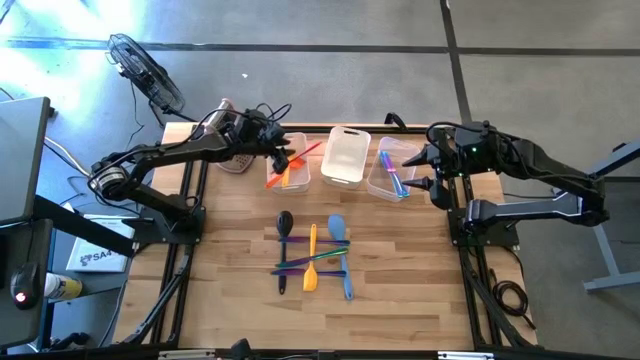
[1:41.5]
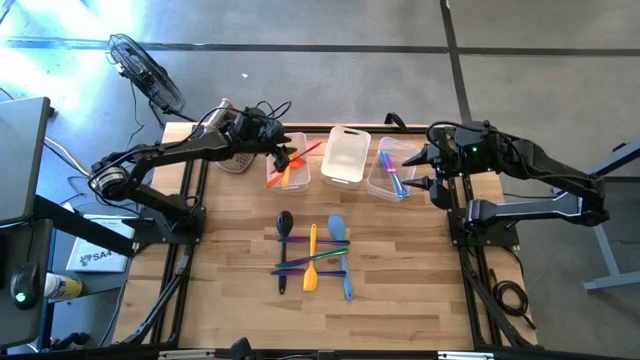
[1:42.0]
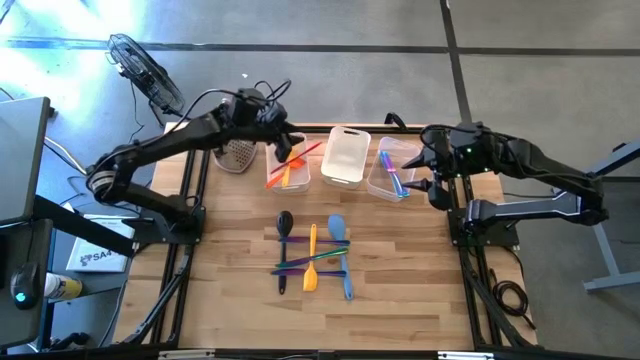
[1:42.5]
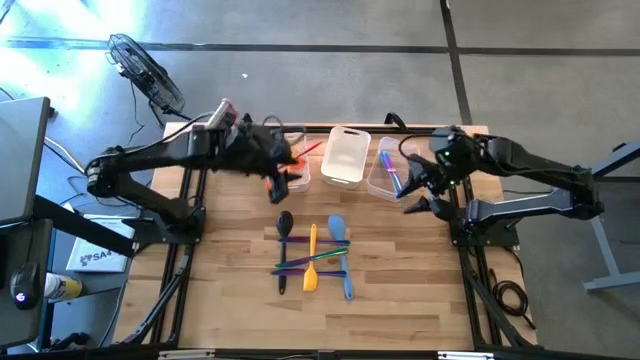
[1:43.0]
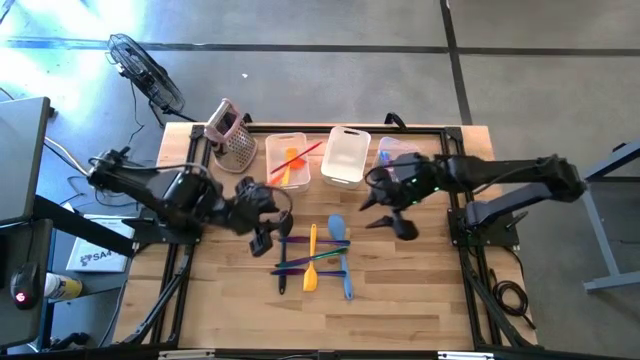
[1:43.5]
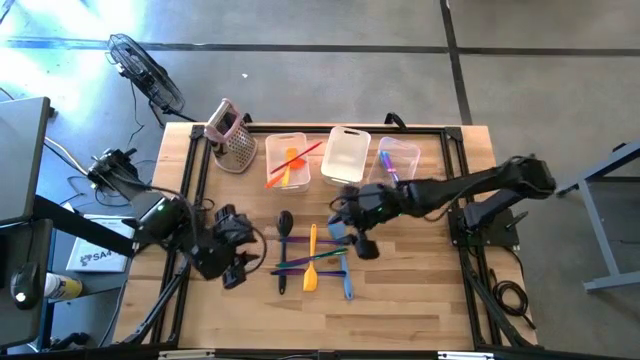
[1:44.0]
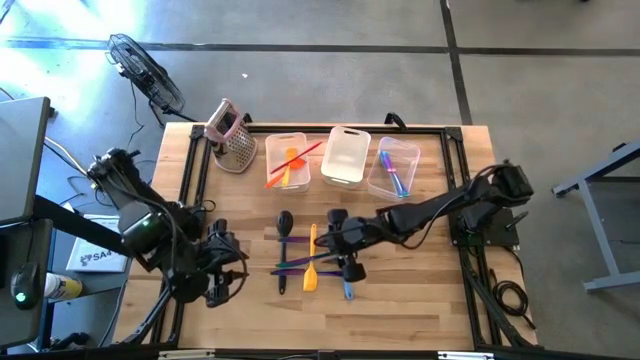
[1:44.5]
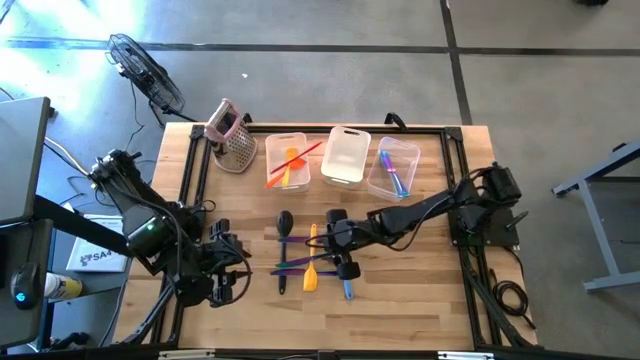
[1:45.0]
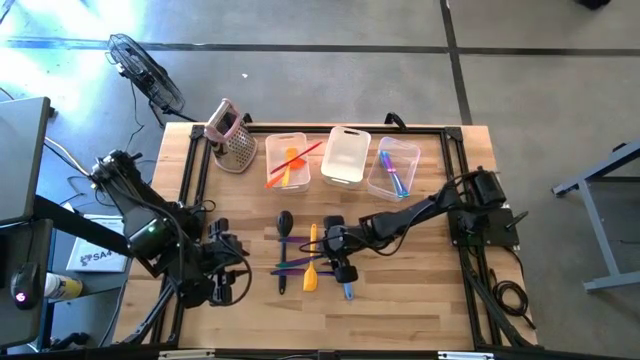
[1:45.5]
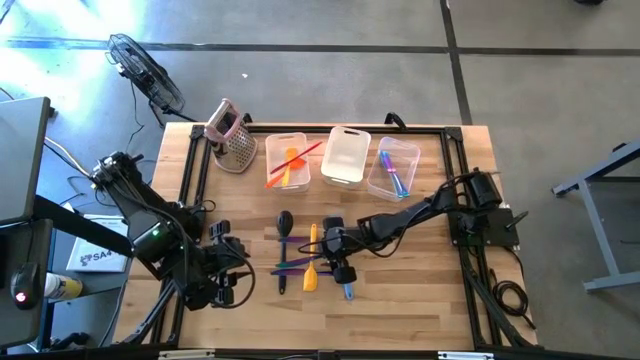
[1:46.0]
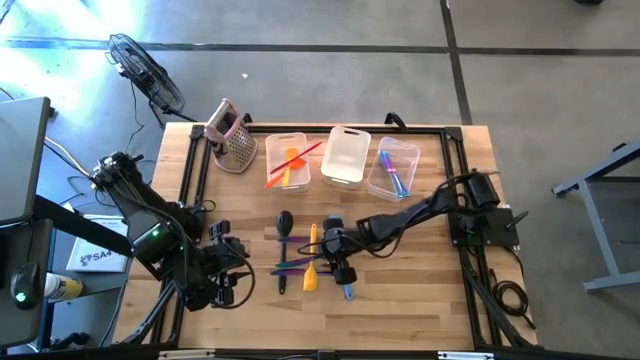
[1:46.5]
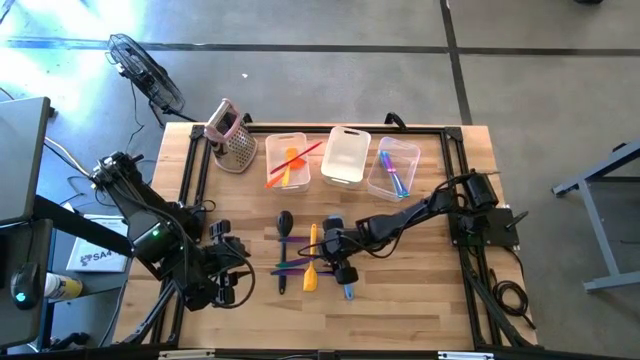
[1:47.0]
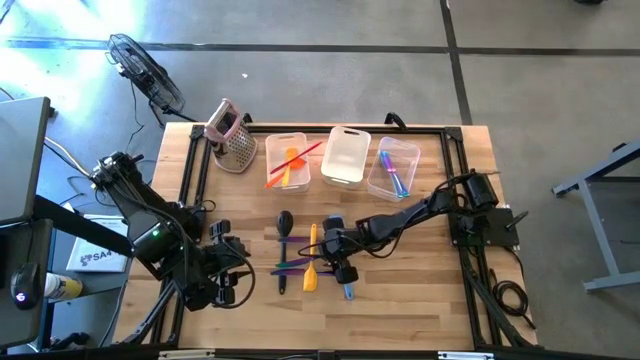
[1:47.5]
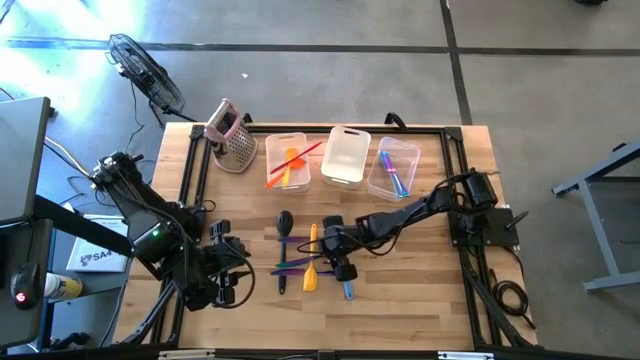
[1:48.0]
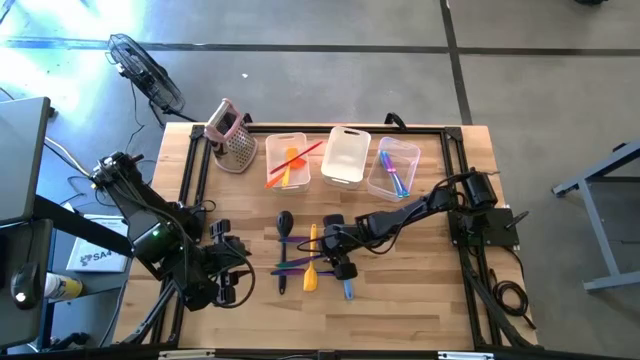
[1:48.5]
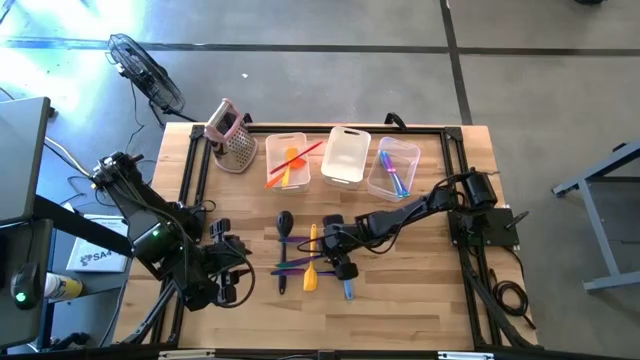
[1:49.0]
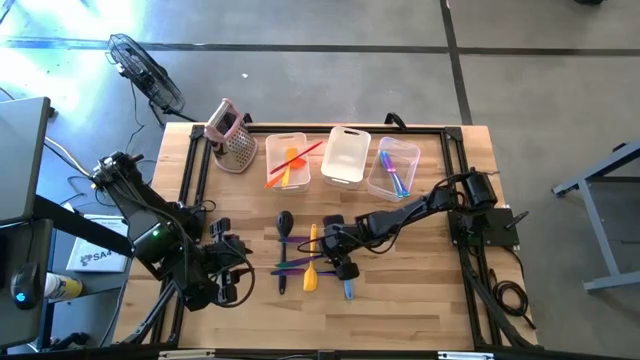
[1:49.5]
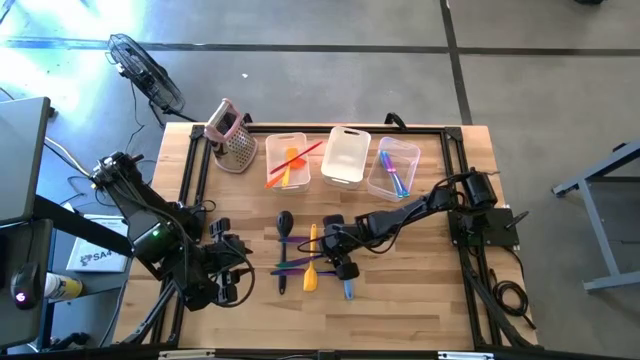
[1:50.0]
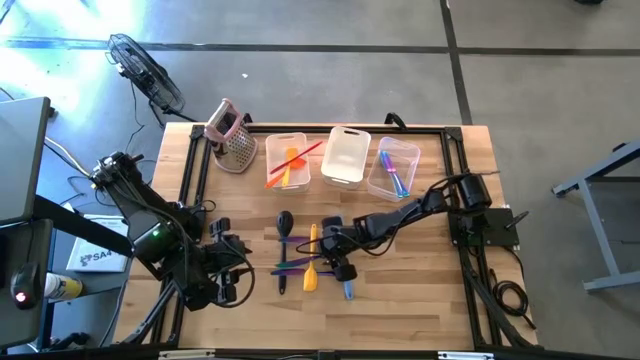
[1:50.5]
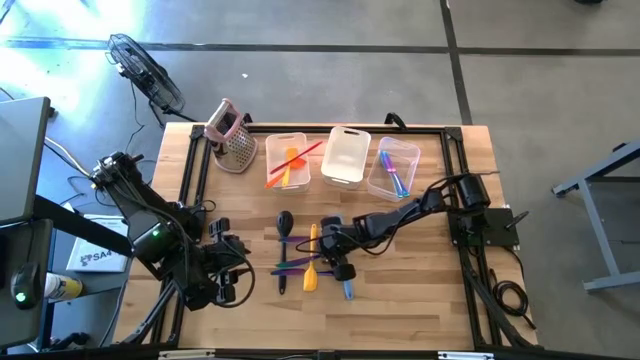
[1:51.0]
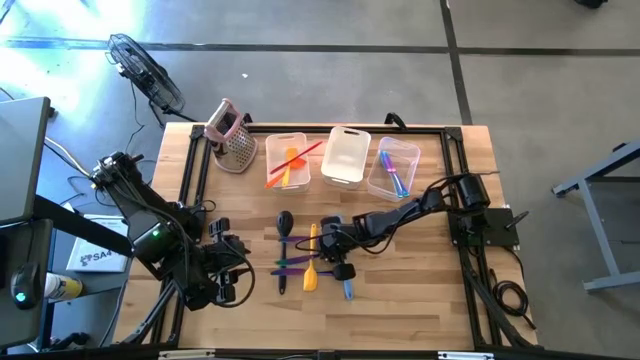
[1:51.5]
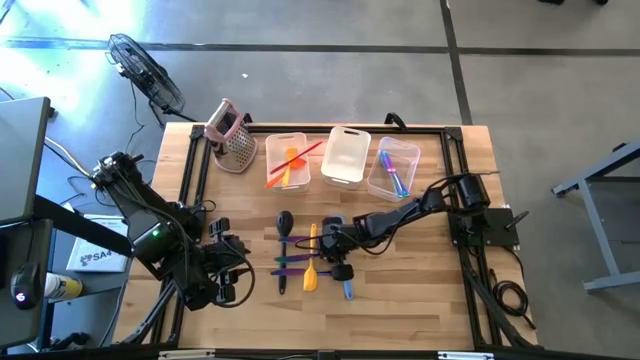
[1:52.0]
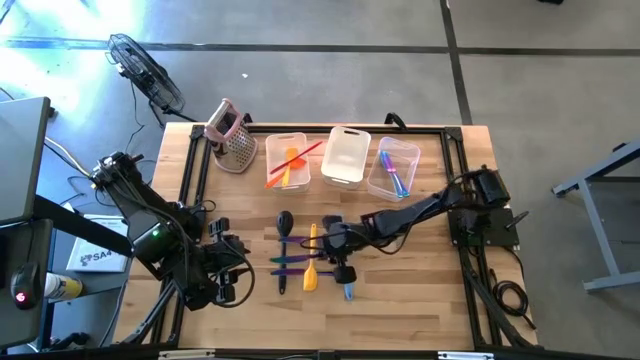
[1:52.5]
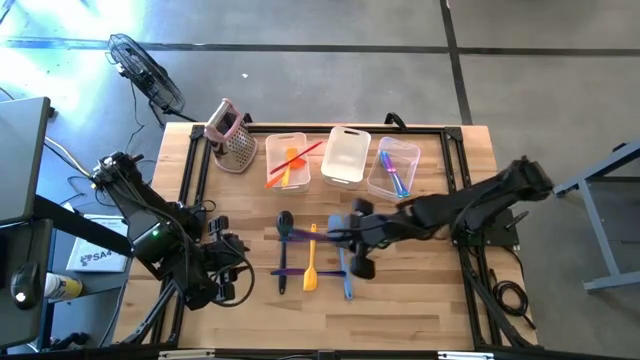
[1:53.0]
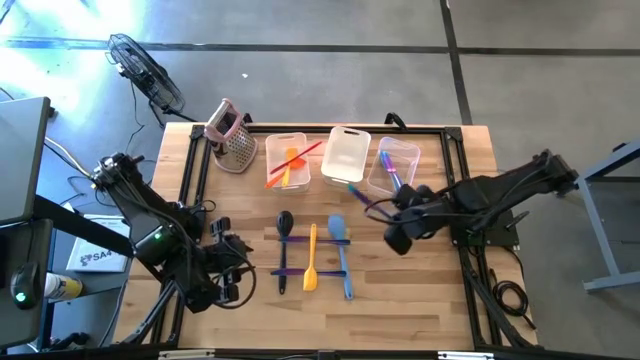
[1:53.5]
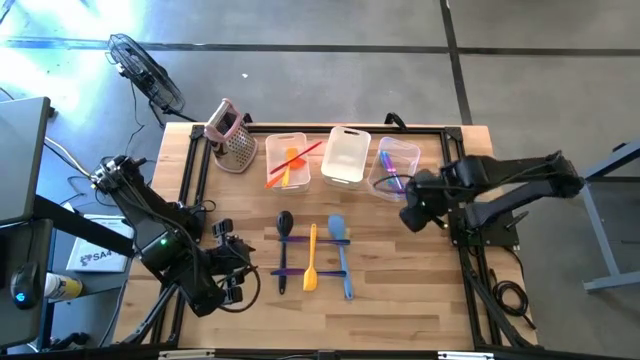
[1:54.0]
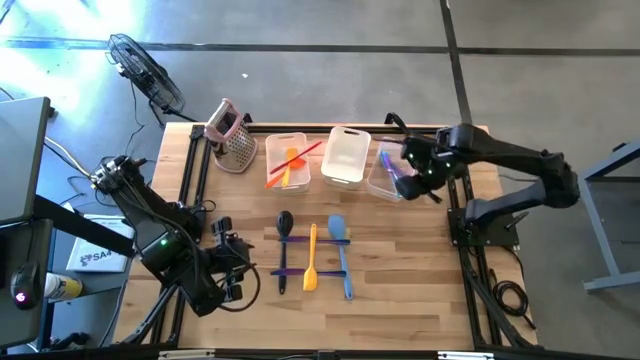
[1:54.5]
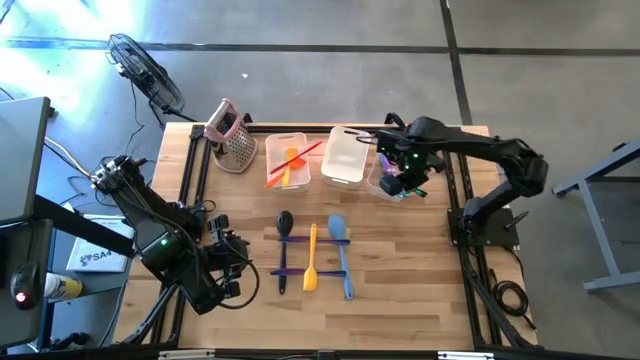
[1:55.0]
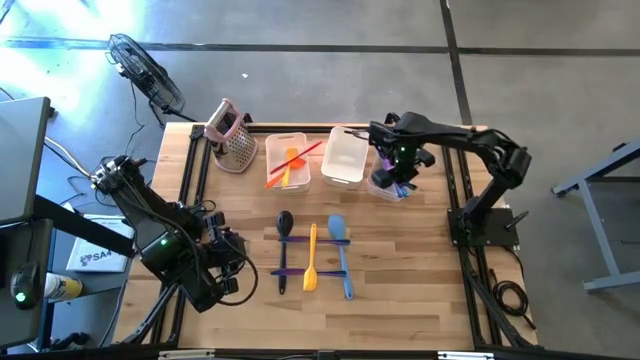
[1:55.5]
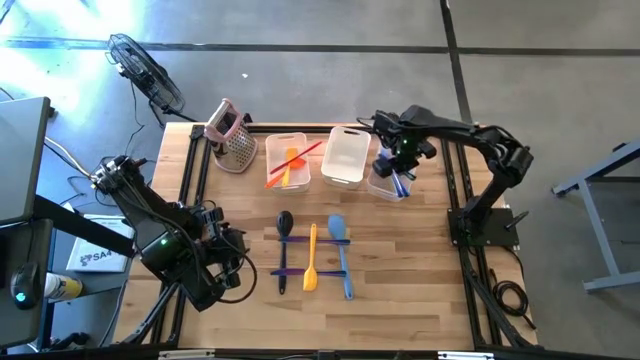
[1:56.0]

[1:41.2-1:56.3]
Task: Pick & Place Kitchen Items
Put the blue table knife into the transparent bin

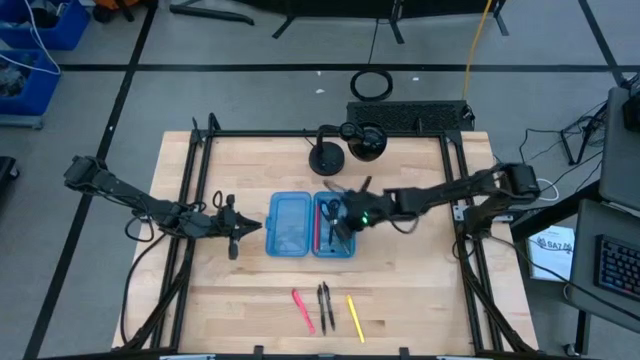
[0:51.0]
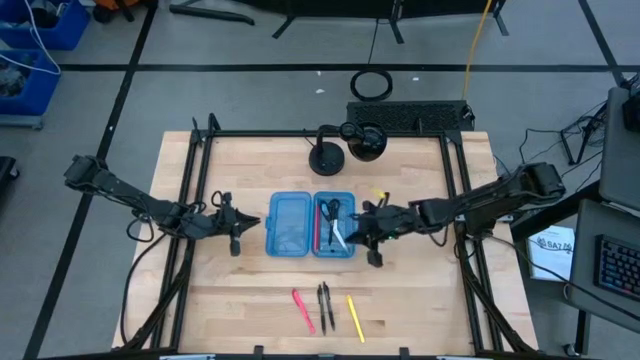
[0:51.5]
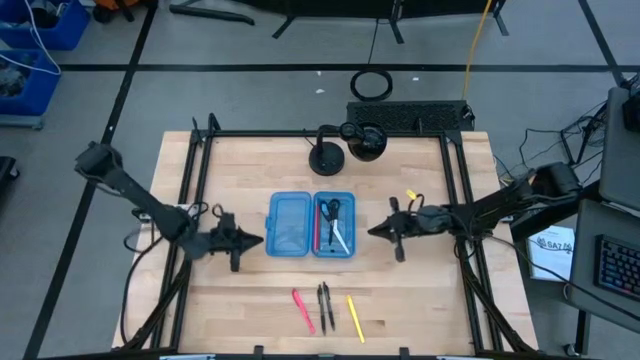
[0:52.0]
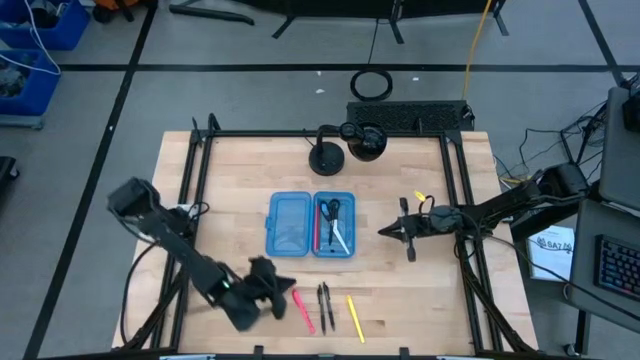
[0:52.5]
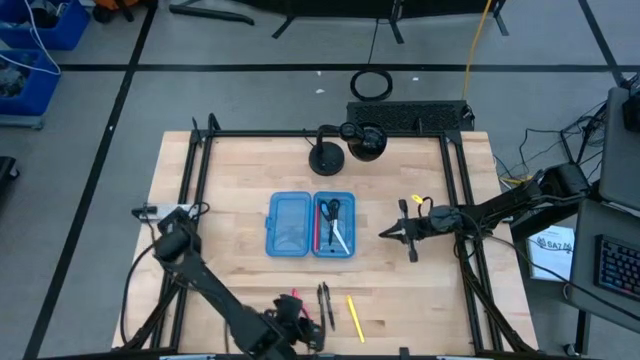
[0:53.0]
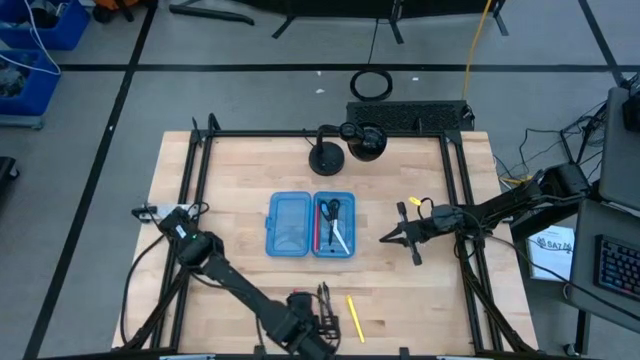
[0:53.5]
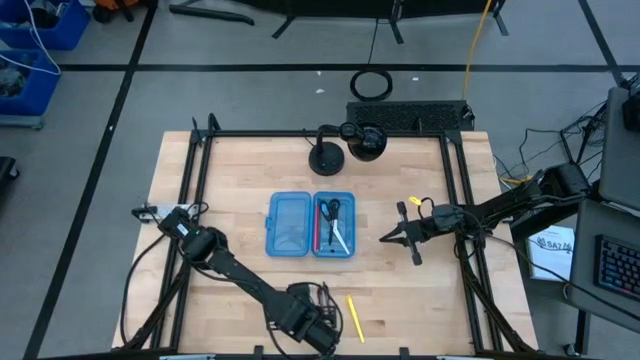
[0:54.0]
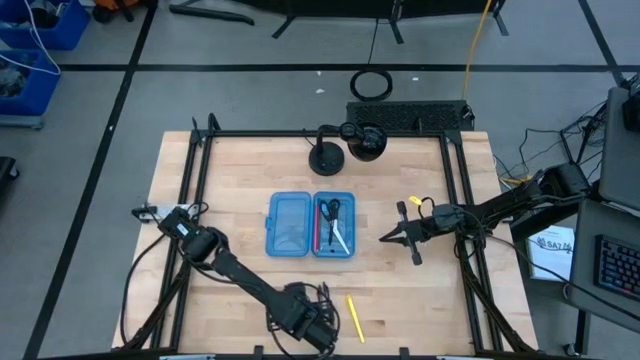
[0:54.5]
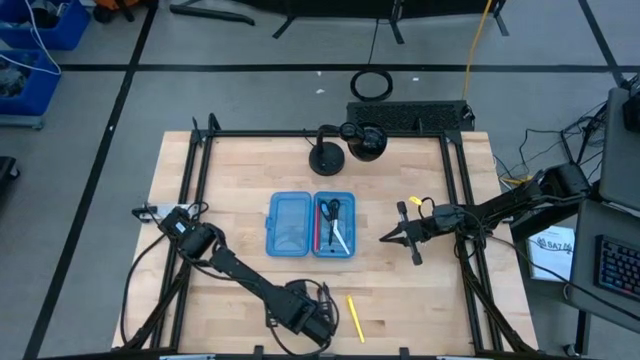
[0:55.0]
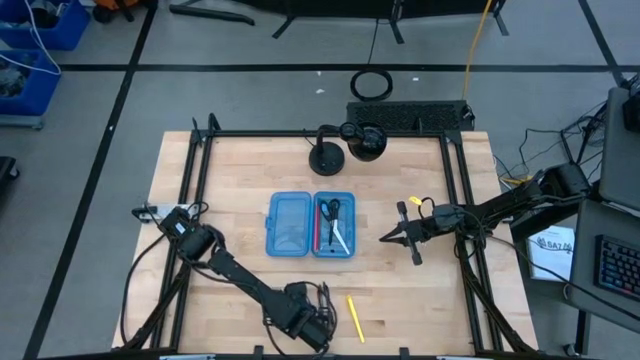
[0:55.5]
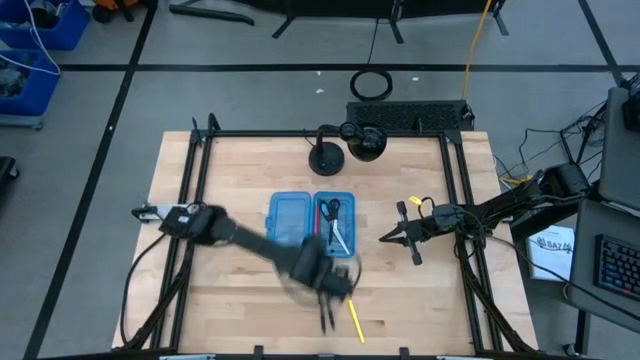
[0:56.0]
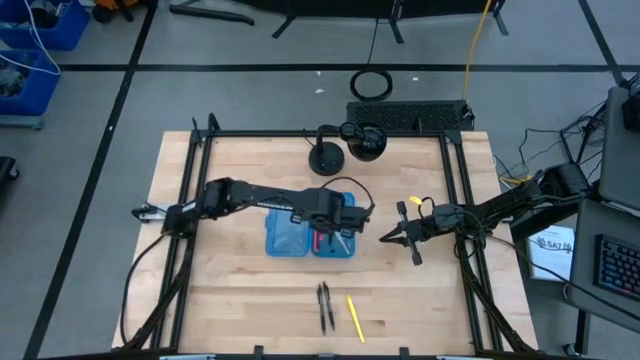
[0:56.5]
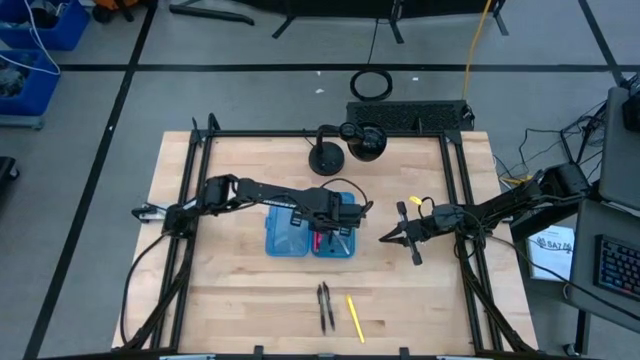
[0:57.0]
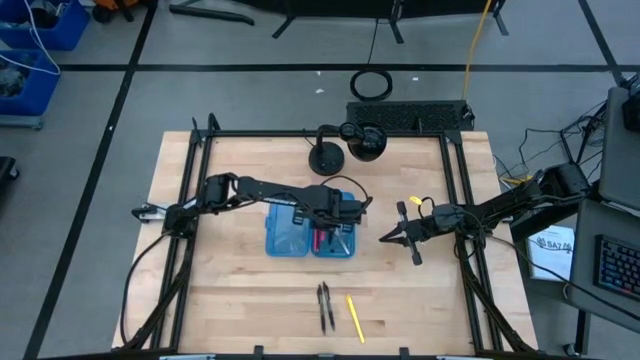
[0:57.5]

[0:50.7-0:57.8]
Task: Pick & place school supplies into a supply box
Put the pink pen into the blue supply box

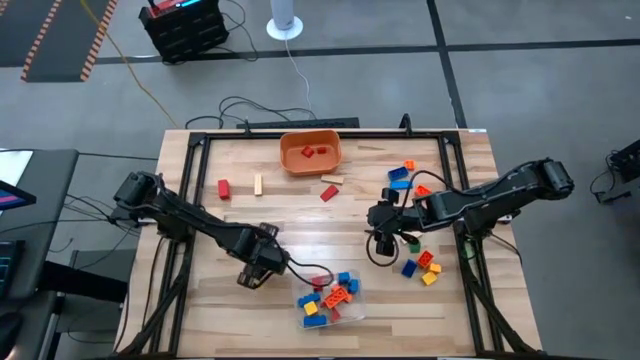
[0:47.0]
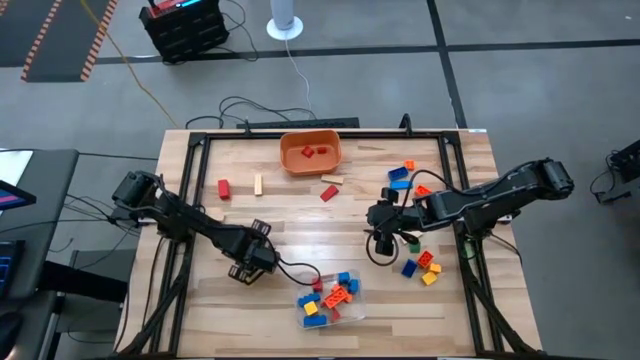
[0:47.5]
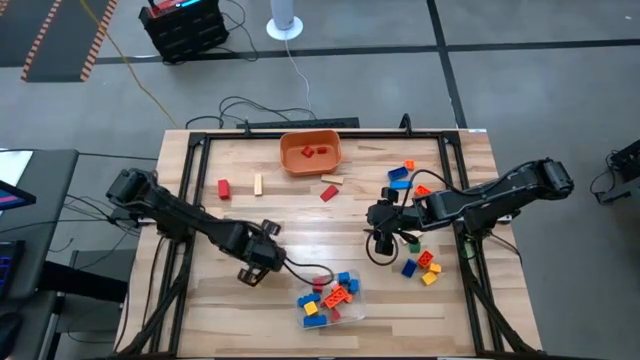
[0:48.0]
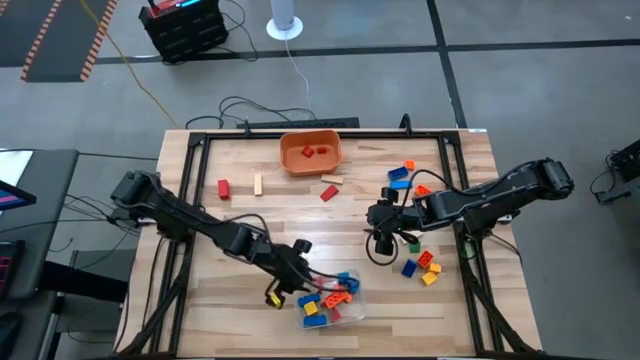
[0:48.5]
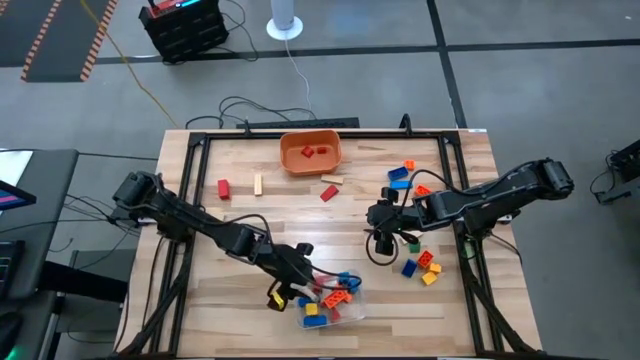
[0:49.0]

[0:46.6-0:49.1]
Task: Sort blocks by size
Put the large brown wooden block into the transparent bin
